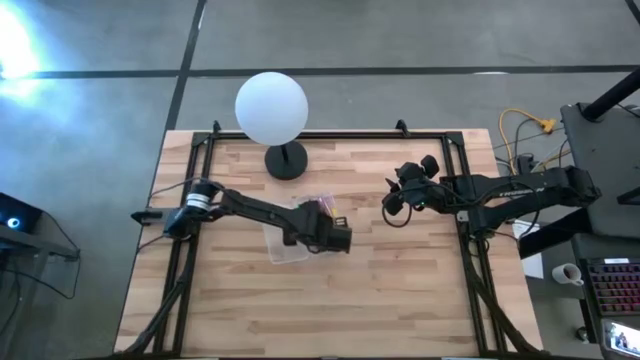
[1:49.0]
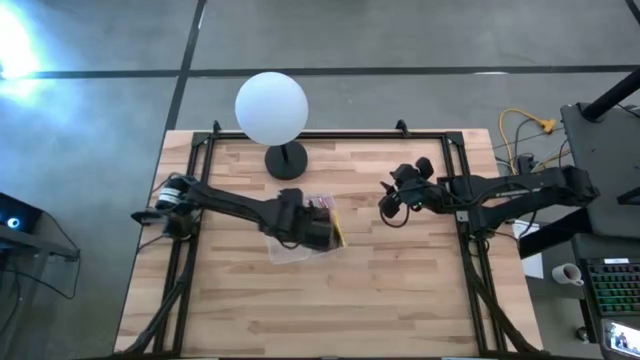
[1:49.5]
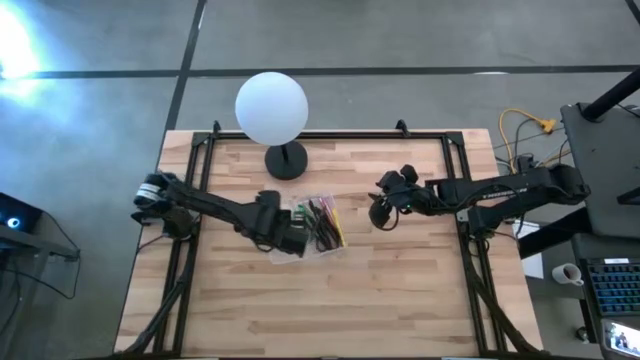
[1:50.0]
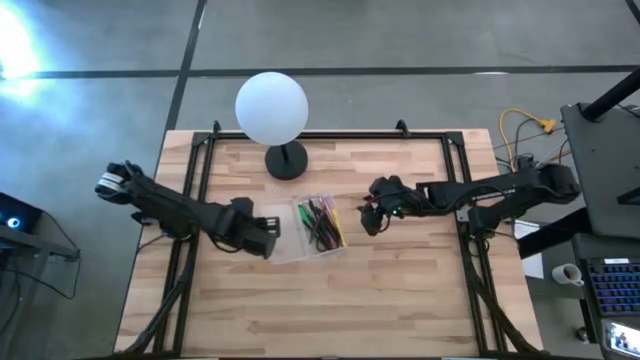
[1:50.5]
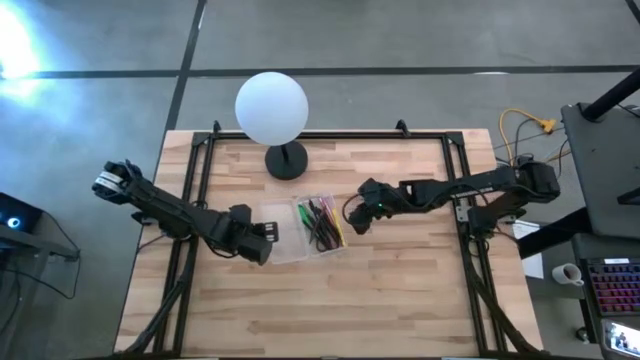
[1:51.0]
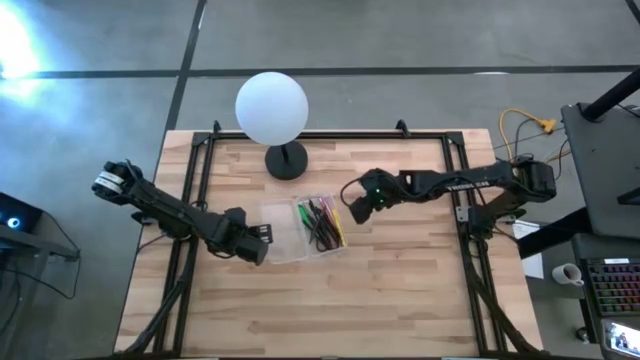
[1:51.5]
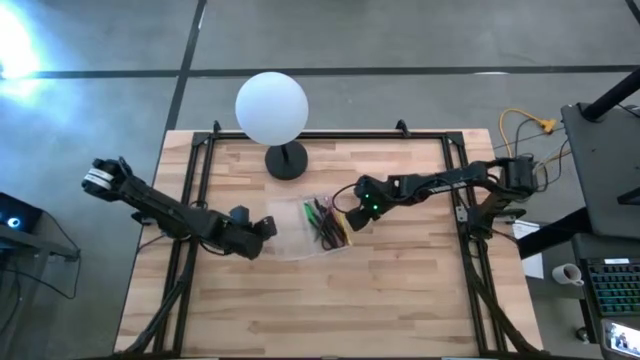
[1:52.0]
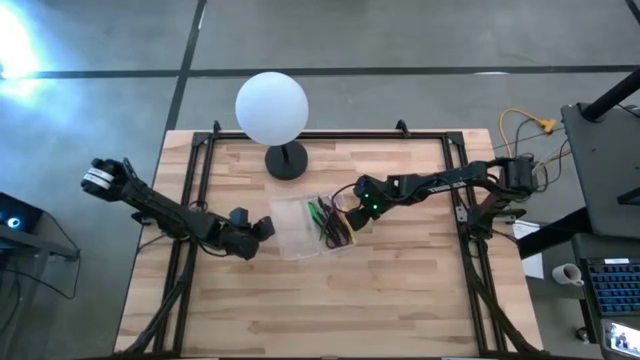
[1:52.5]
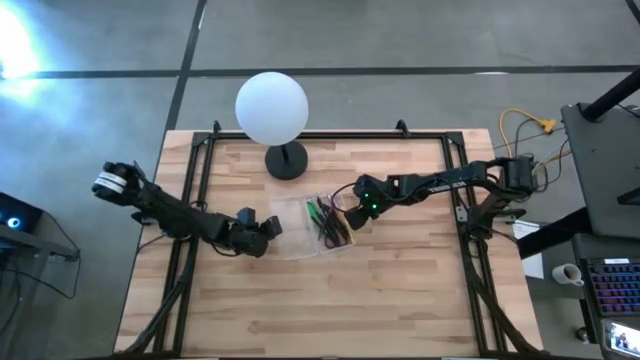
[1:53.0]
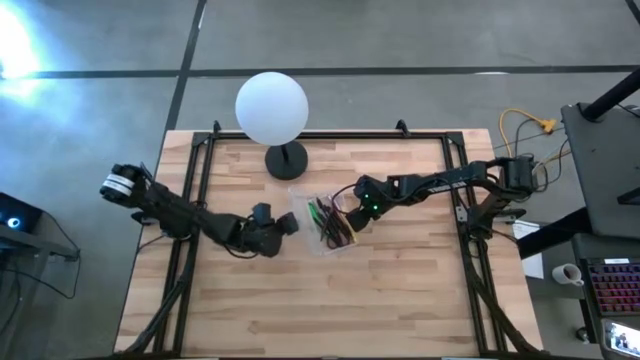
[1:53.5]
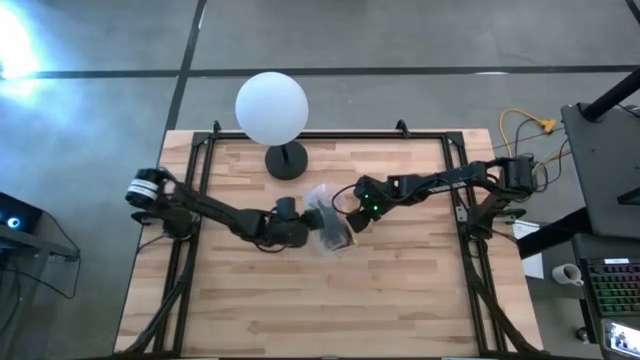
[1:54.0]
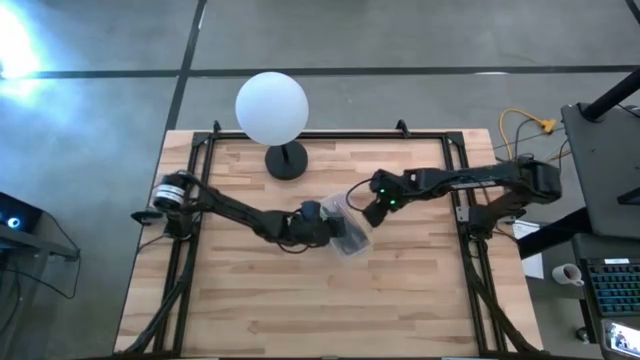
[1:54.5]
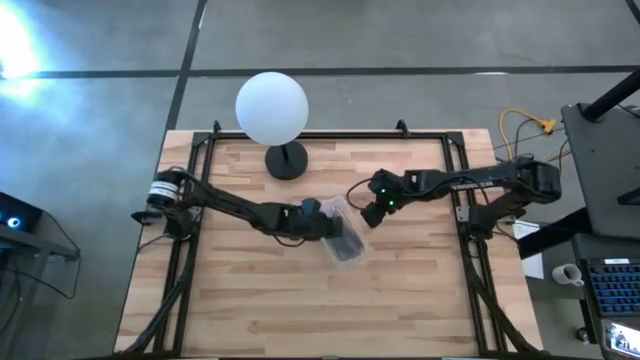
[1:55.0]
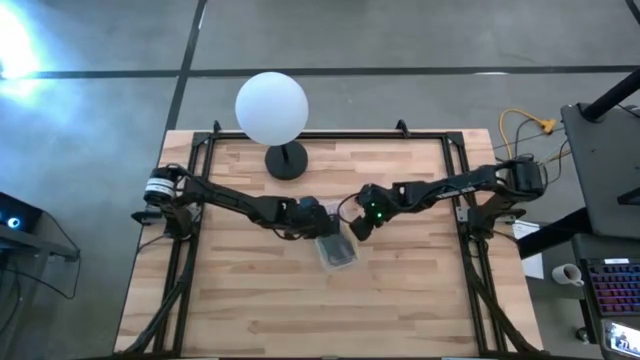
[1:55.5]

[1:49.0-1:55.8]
Task: Pick & place school supplies into a supply box
Close the supply box cover

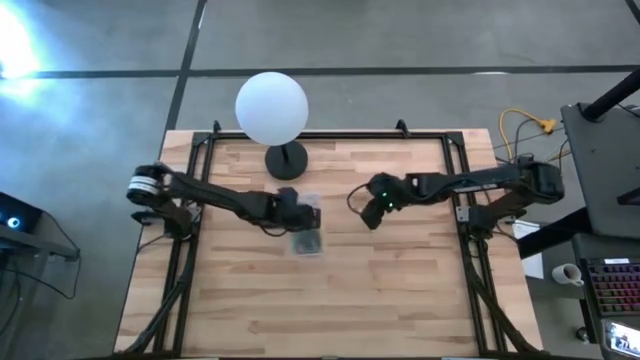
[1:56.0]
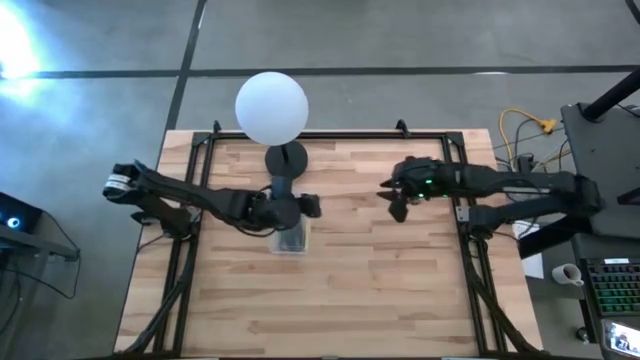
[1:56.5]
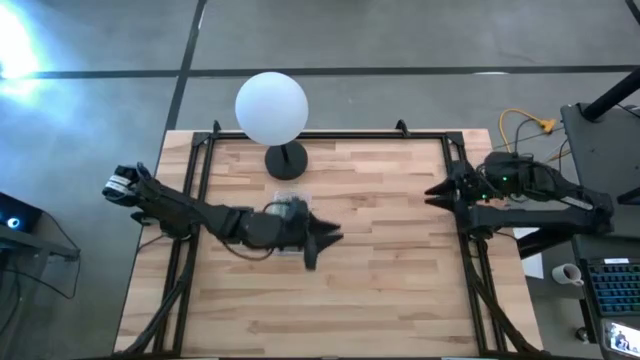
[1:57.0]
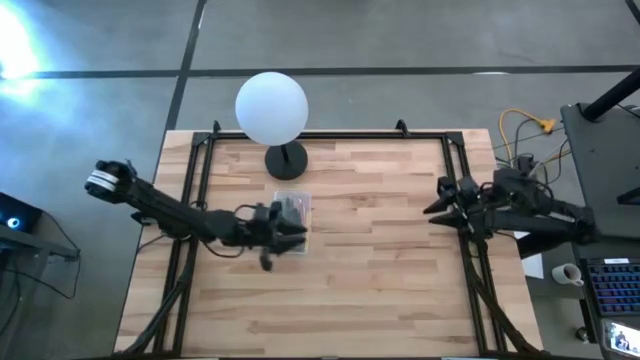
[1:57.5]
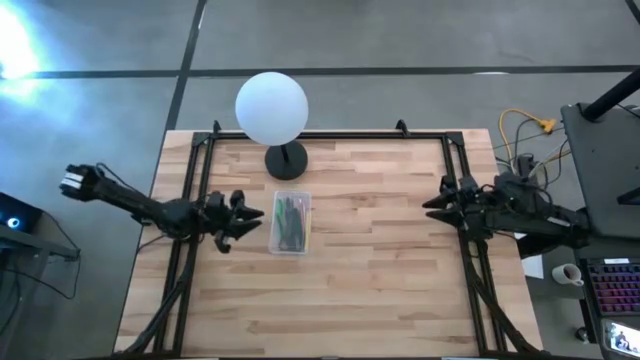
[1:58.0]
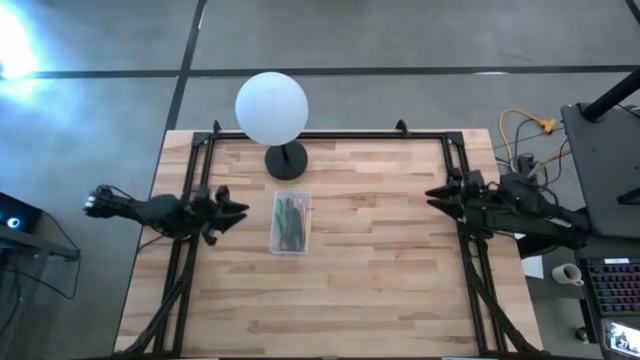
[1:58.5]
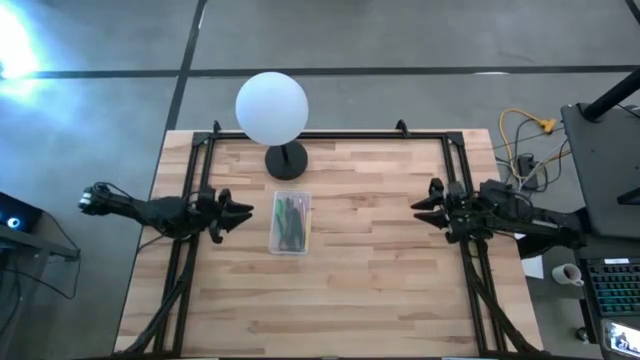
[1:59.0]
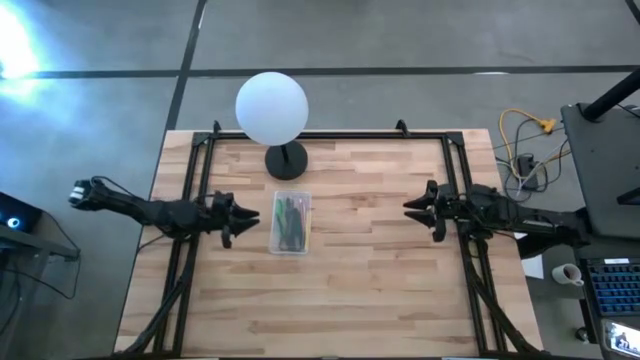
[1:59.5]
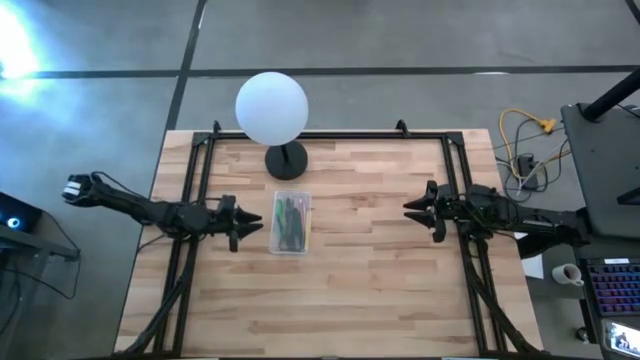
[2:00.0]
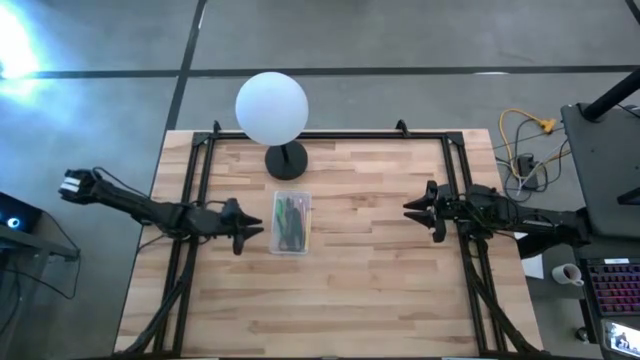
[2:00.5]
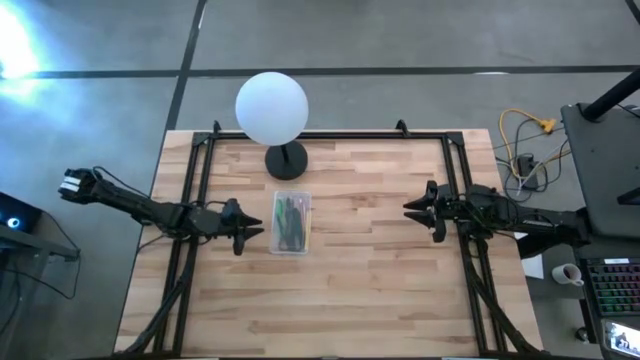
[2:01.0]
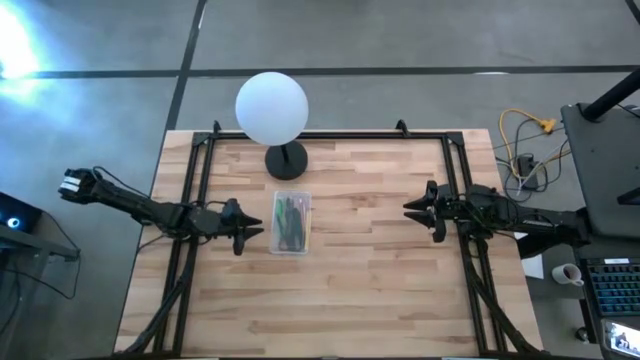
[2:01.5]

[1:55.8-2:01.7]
Return to Home Position
